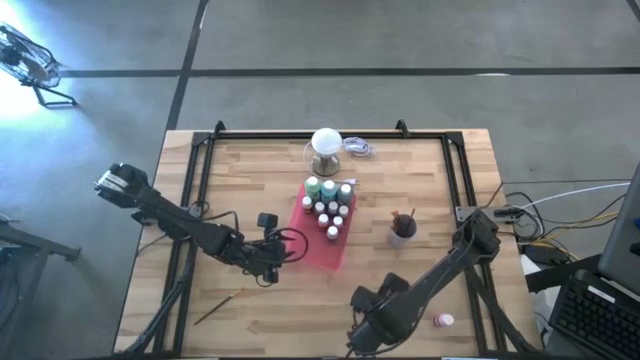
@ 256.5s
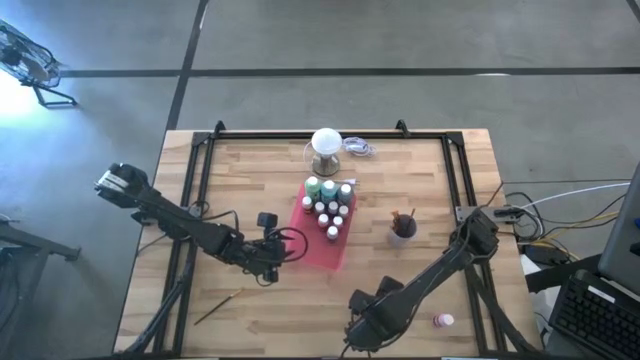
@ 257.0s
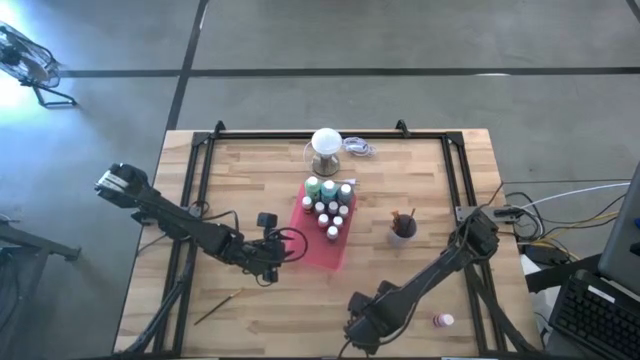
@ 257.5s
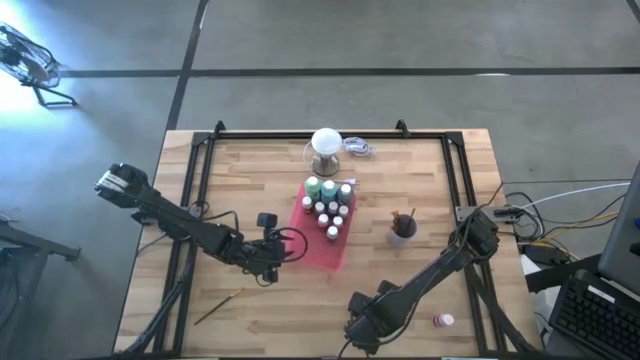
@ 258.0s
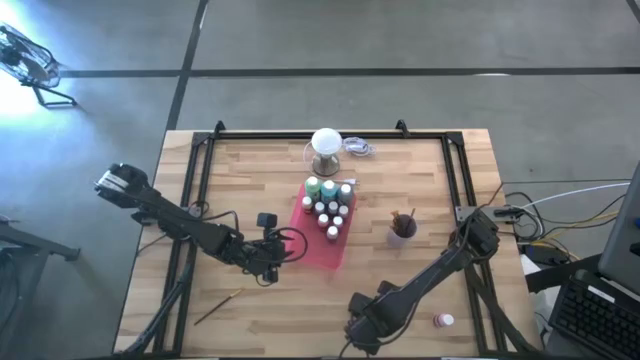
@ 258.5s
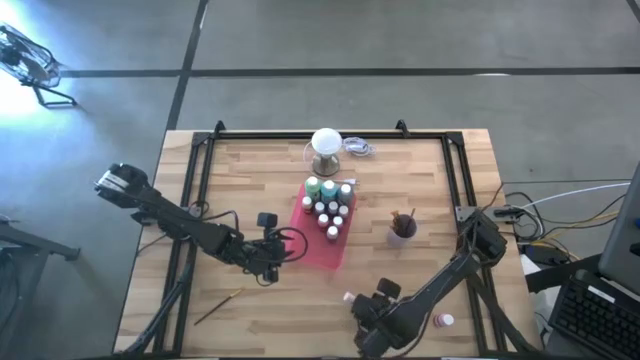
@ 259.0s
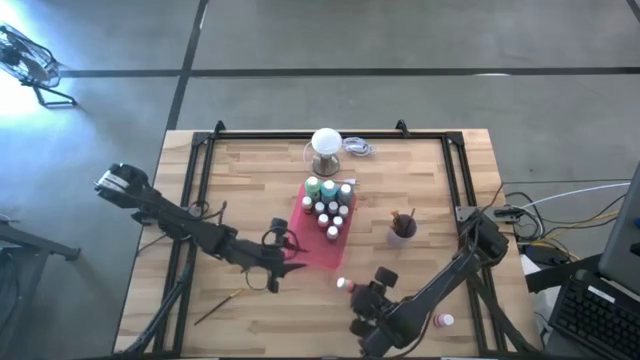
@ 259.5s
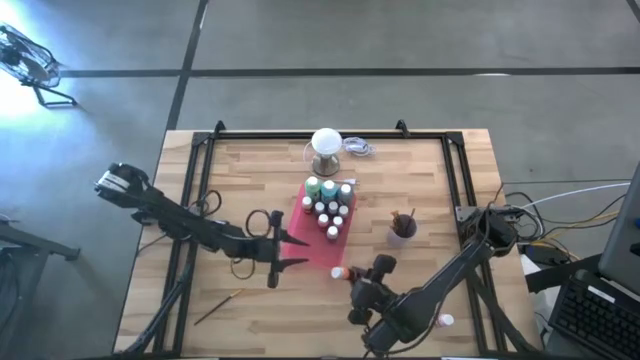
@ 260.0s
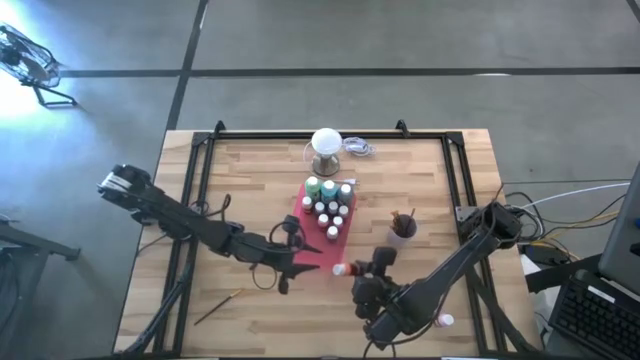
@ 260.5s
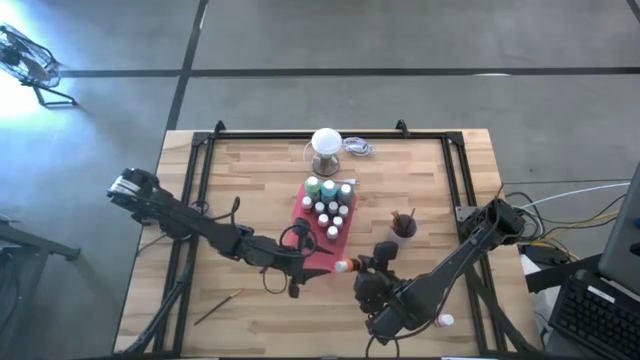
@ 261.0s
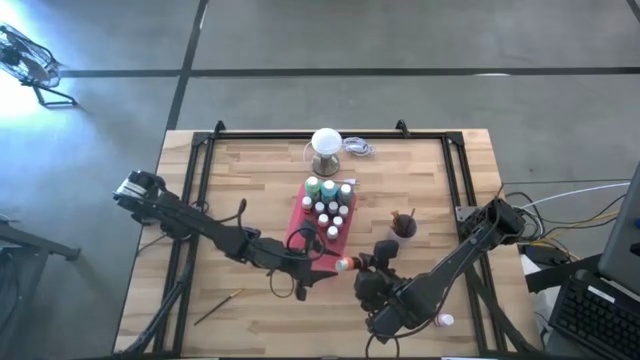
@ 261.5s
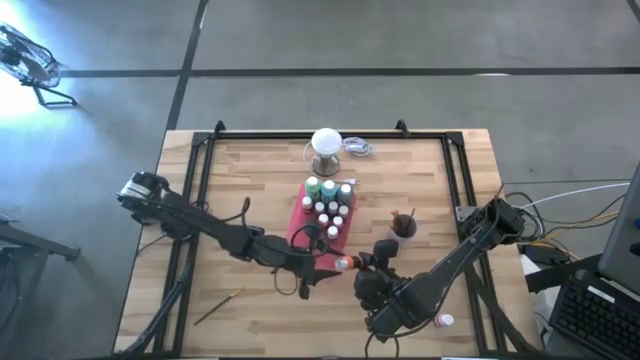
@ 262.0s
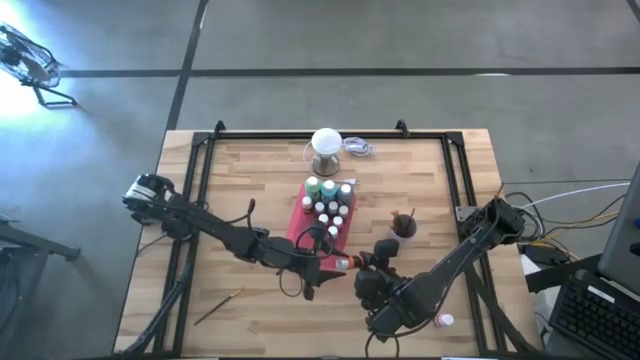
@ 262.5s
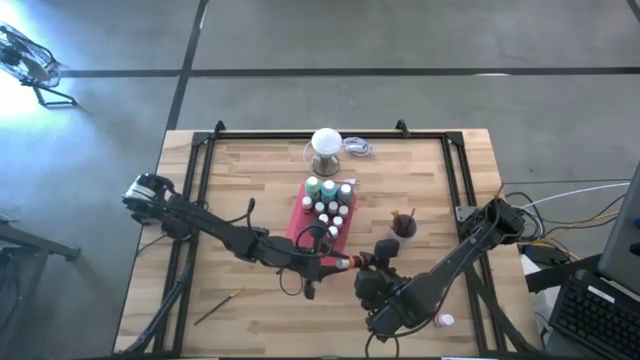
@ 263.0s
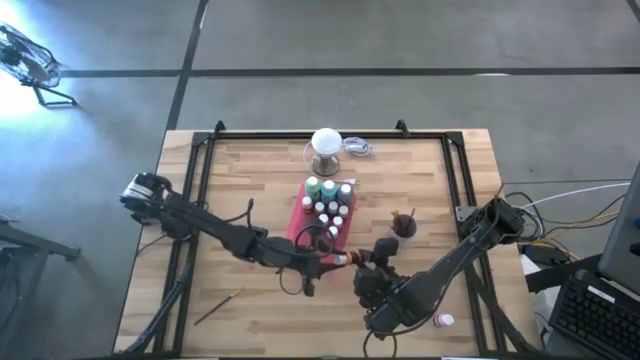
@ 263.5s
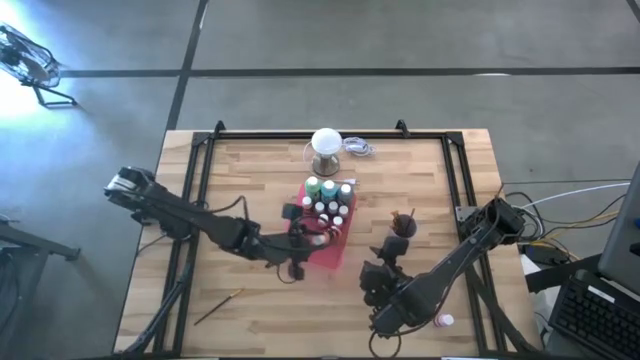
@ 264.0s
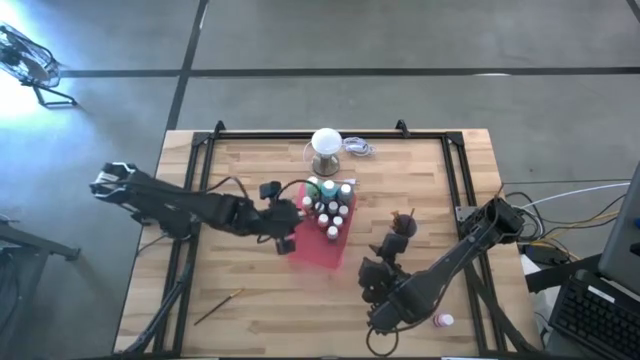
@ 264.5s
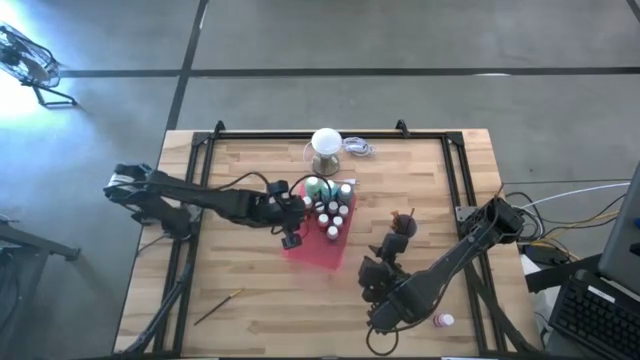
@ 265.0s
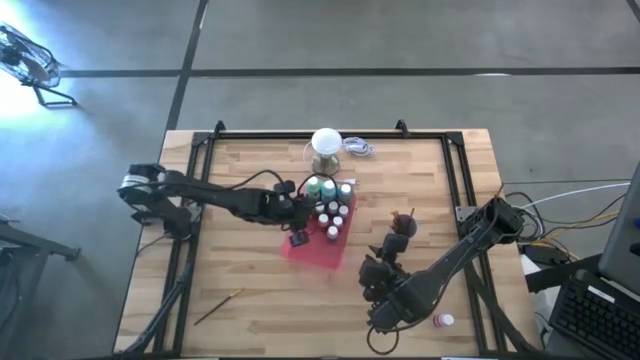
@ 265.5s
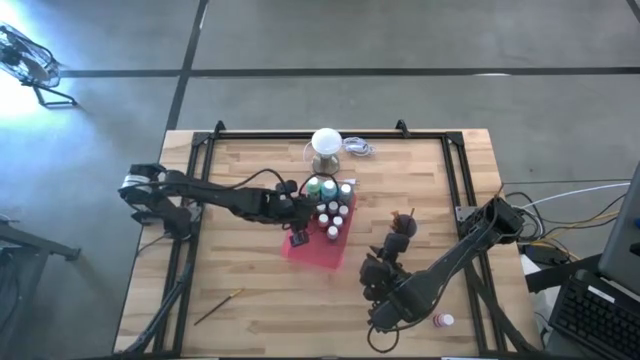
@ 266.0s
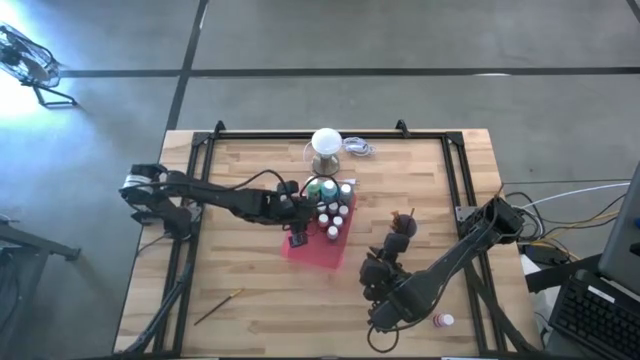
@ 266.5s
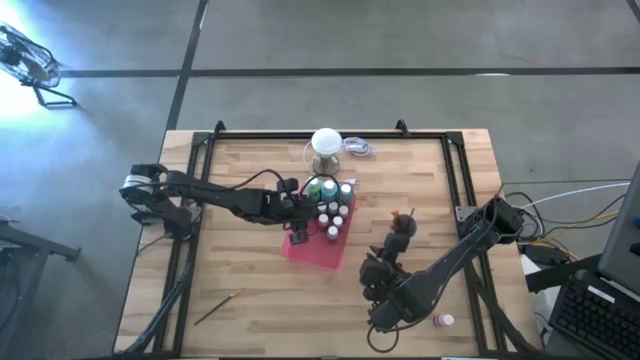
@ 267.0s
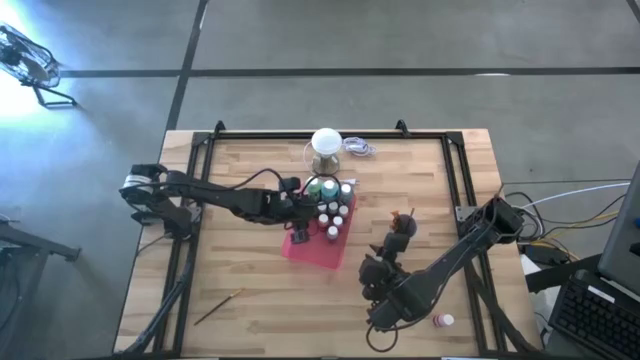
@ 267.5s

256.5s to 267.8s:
Task: Pick & Place Paint Supplies
Put the small orange paint bottle into the red bin

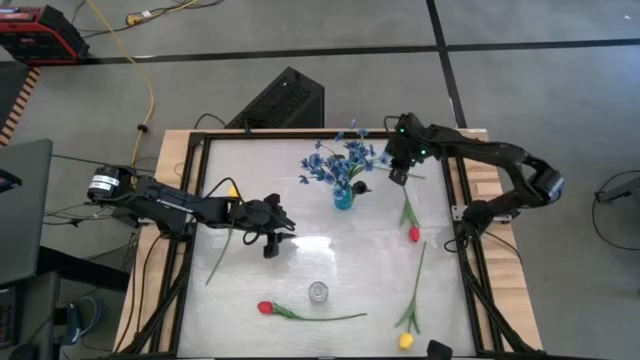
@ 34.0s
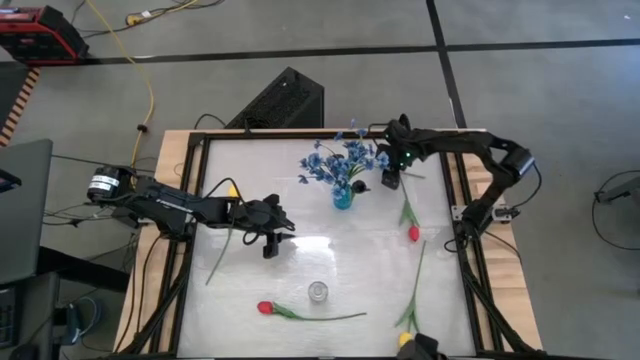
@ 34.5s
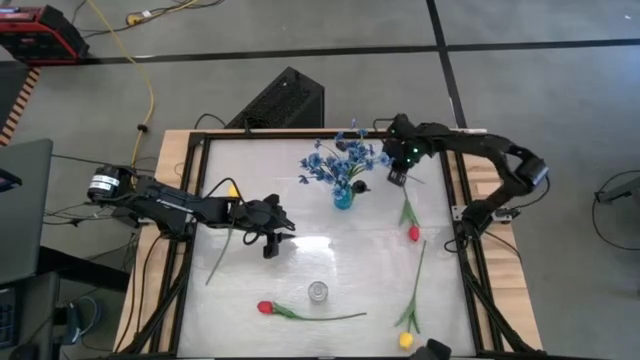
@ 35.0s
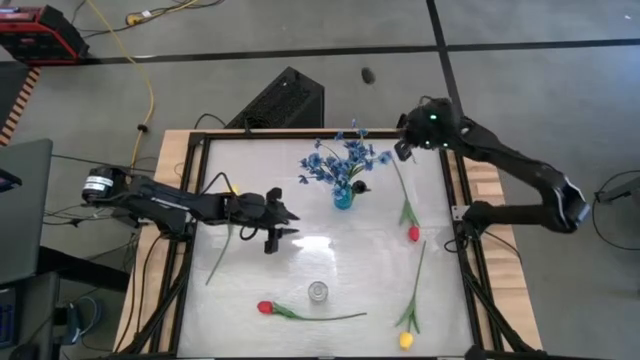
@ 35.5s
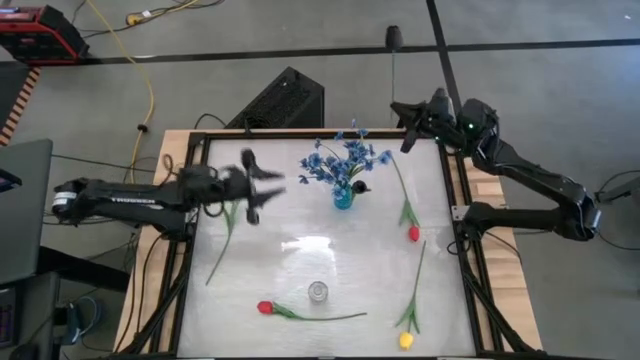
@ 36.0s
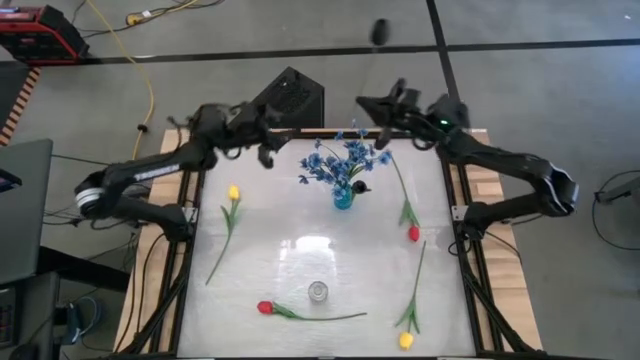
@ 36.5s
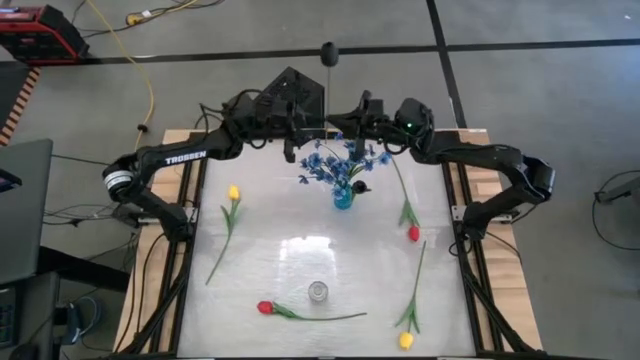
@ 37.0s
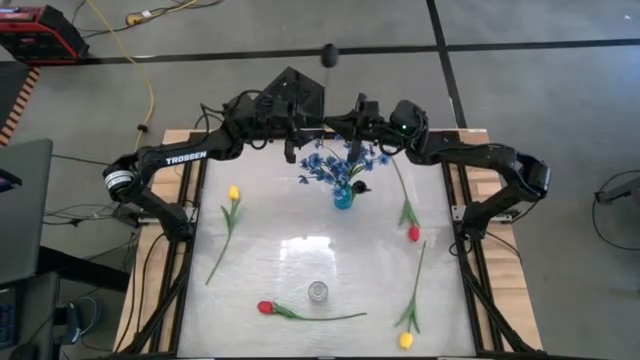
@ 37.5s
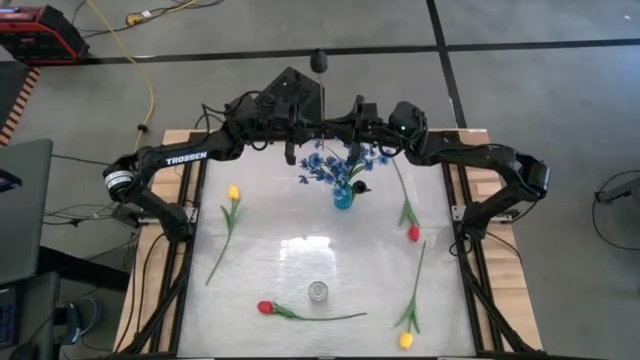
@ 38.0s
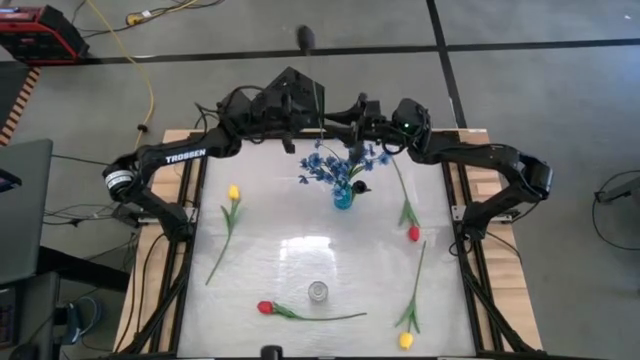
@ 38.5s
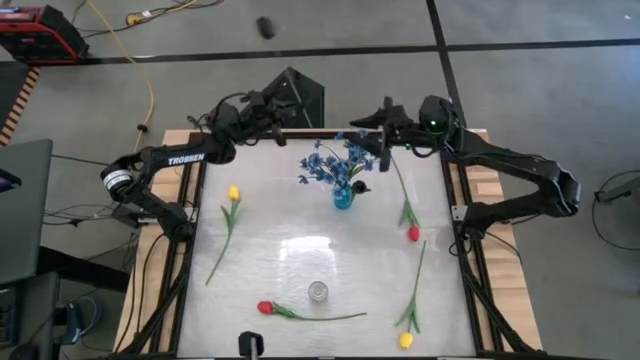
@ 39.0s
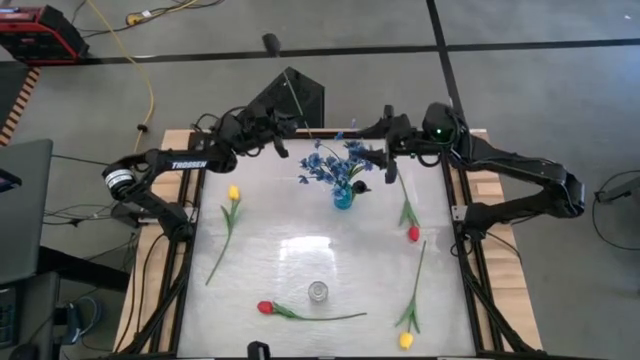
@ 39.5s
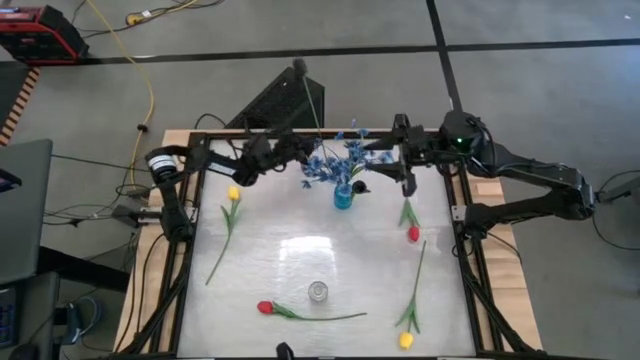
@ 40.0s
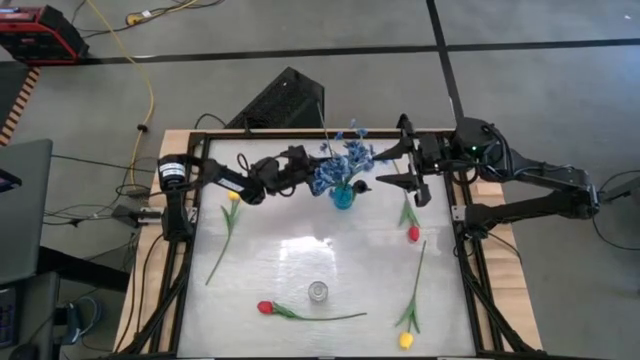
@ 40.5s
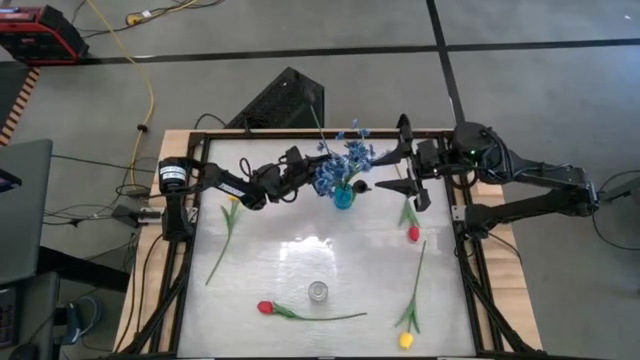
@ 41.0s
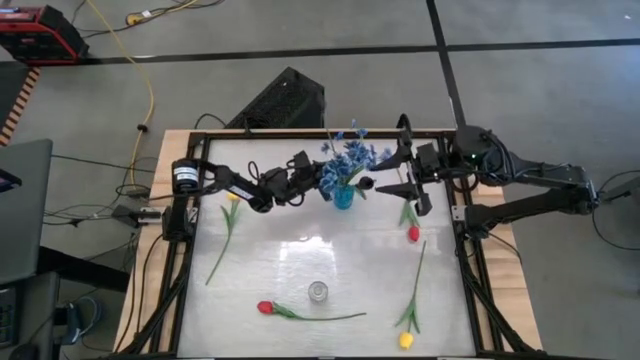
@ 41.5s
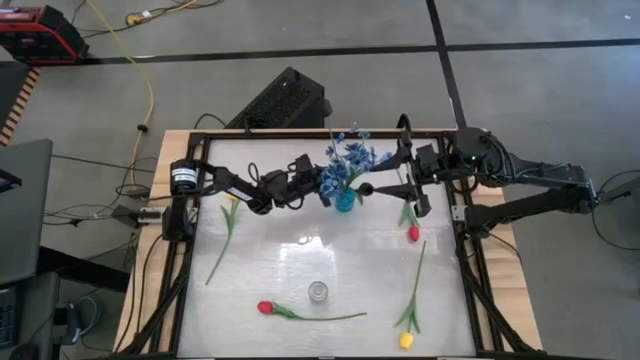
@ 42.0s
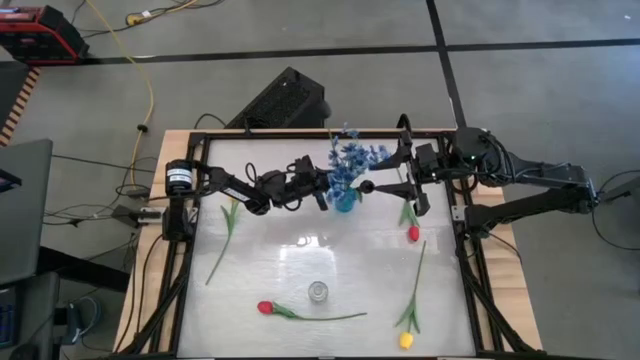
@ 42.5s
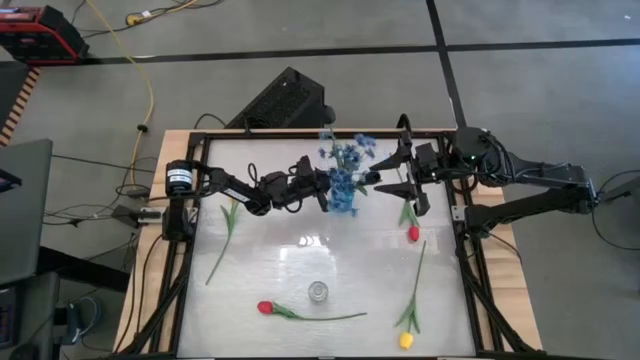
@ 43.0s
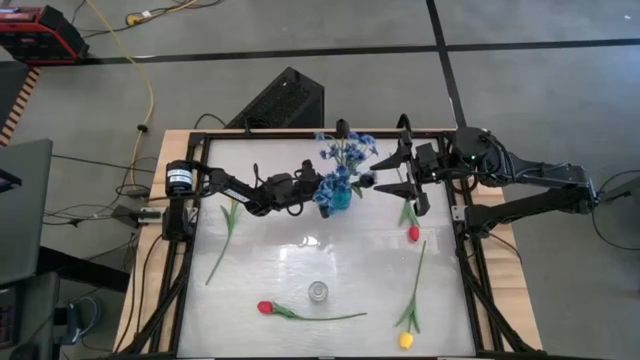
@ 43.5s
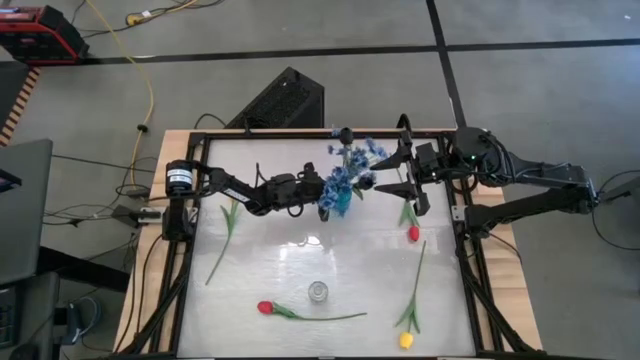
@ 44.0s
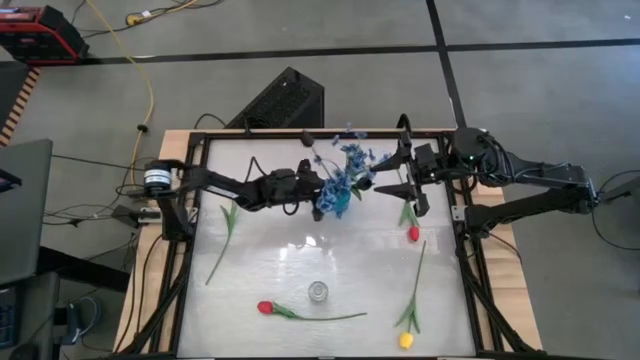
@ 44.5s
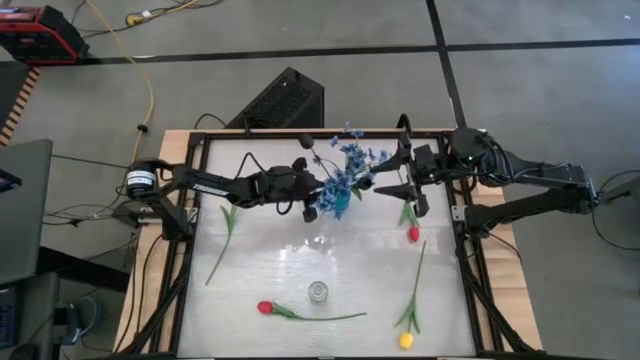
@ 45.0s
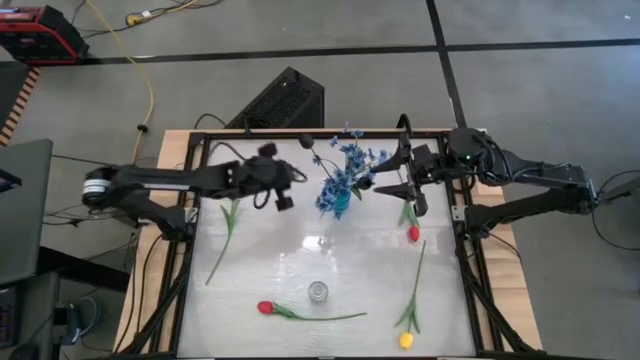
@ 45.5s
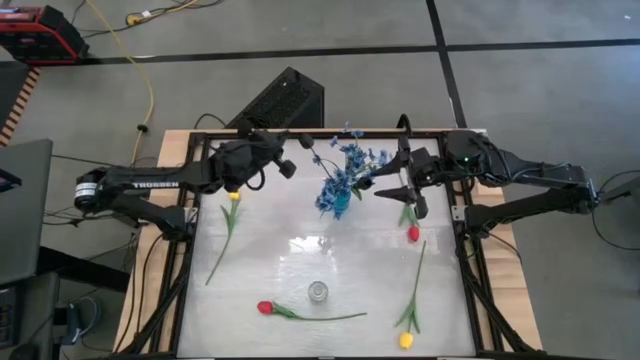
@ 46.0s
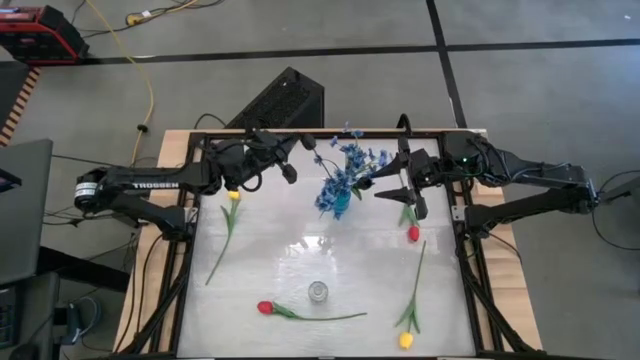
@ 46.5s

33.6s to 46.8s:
Task: Sort flowers into vase by color
Put the black flower into the blue vase
